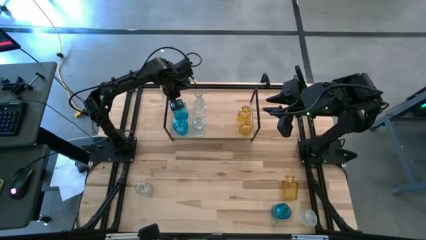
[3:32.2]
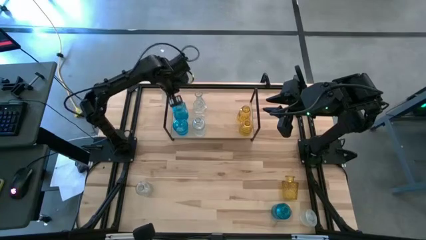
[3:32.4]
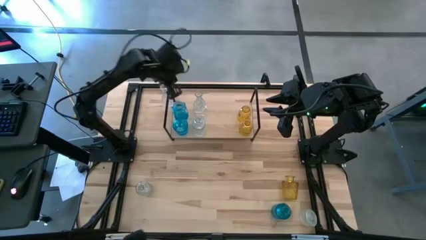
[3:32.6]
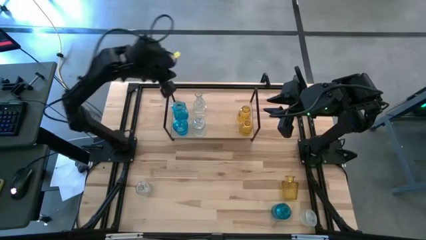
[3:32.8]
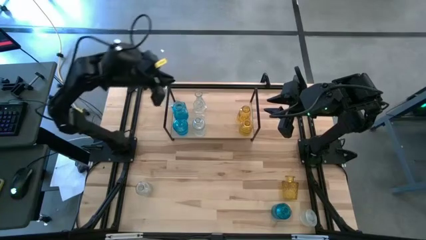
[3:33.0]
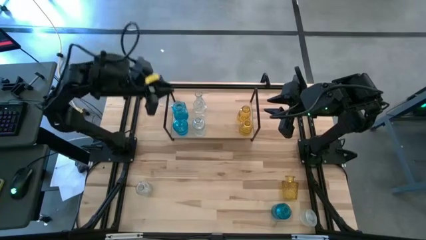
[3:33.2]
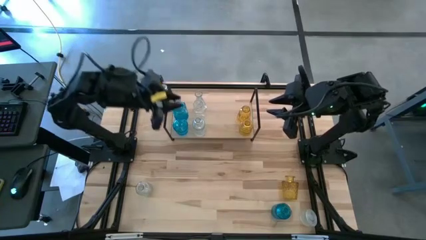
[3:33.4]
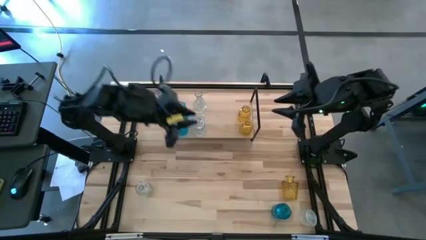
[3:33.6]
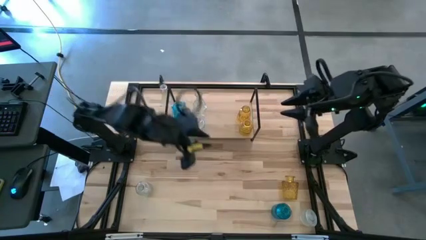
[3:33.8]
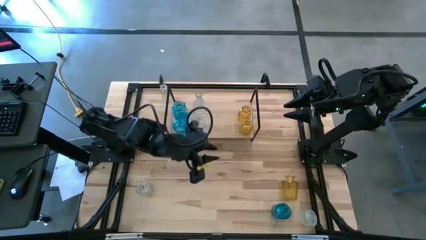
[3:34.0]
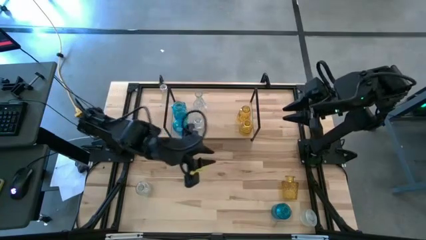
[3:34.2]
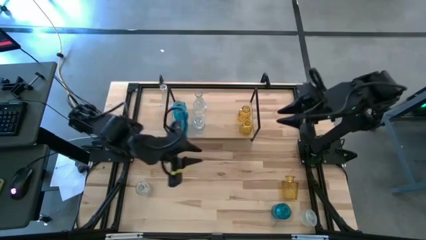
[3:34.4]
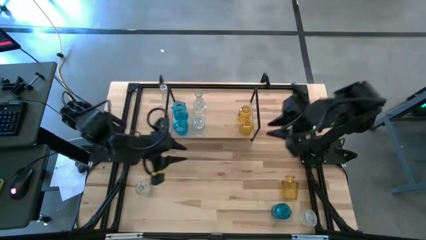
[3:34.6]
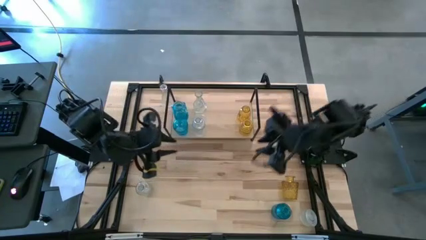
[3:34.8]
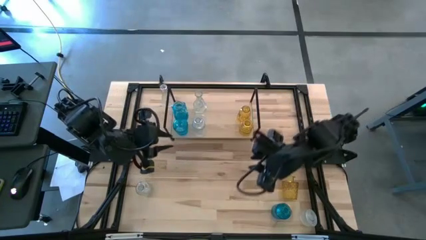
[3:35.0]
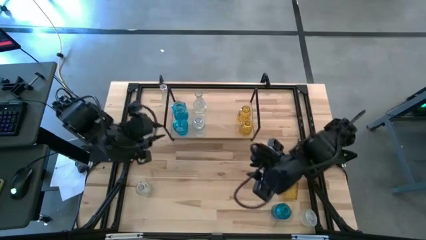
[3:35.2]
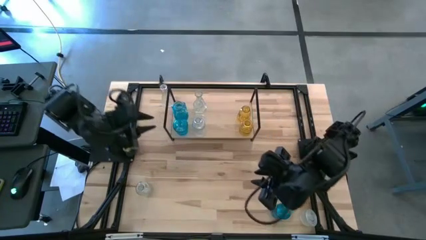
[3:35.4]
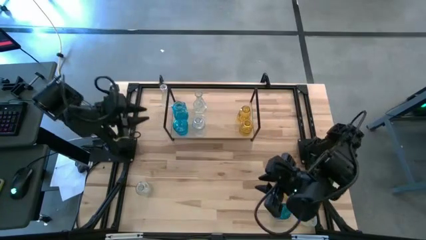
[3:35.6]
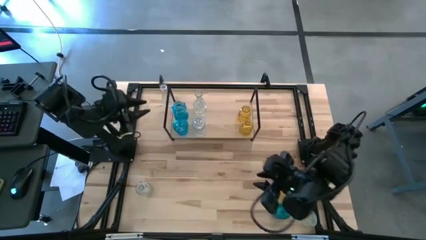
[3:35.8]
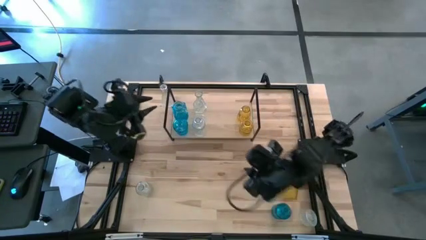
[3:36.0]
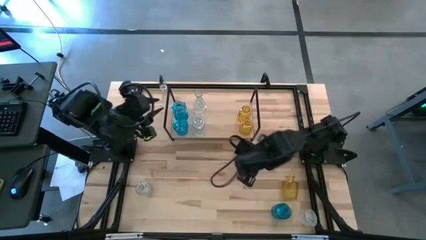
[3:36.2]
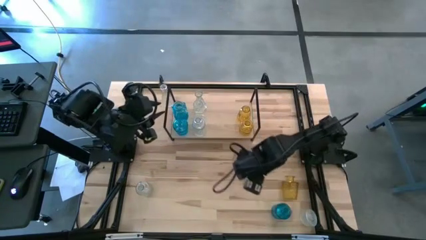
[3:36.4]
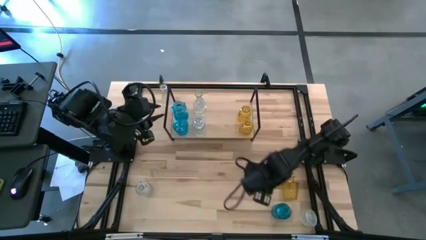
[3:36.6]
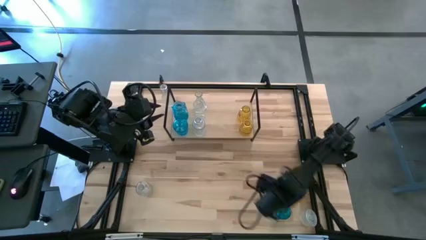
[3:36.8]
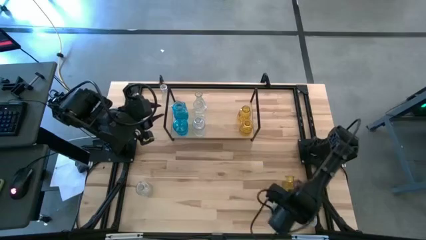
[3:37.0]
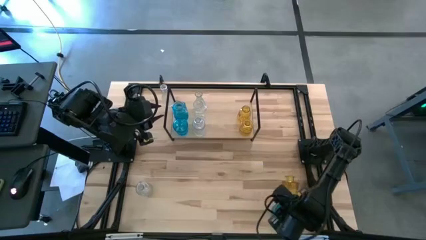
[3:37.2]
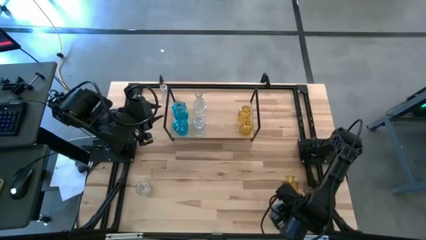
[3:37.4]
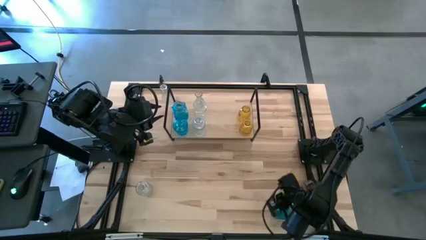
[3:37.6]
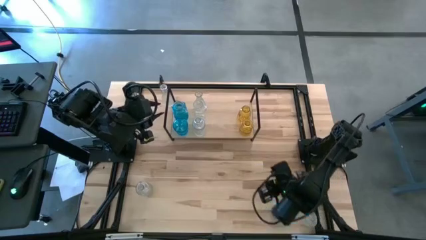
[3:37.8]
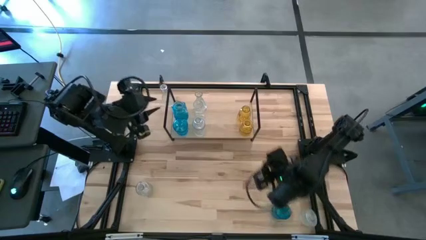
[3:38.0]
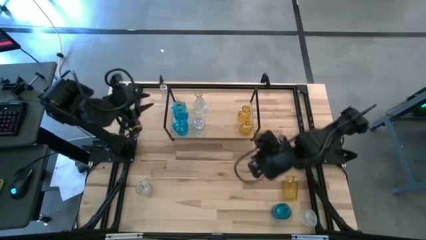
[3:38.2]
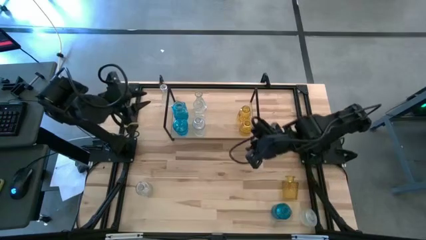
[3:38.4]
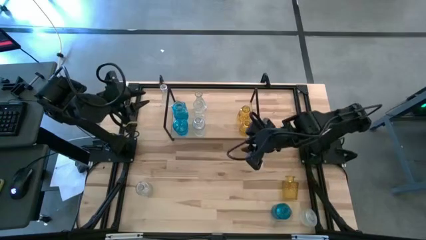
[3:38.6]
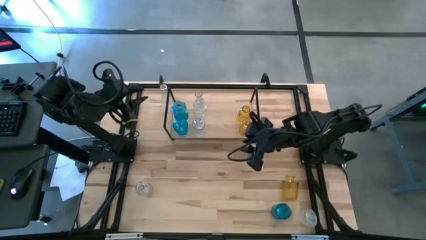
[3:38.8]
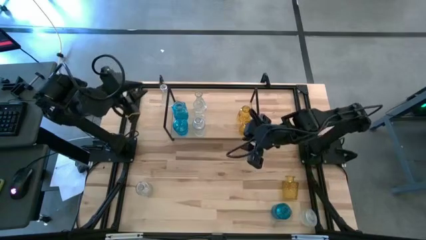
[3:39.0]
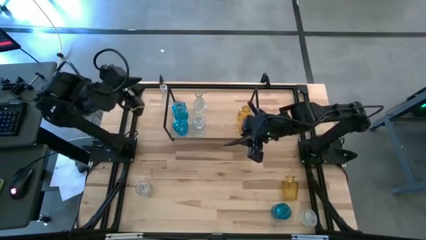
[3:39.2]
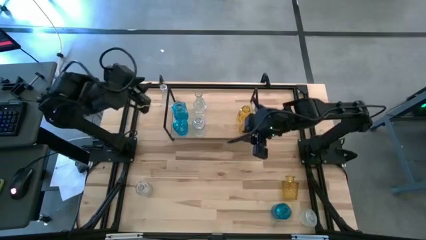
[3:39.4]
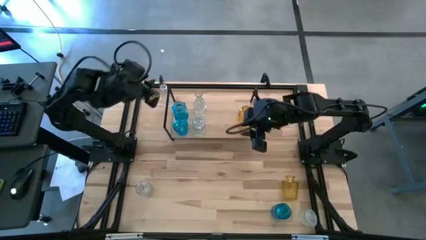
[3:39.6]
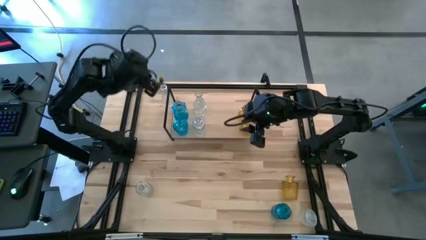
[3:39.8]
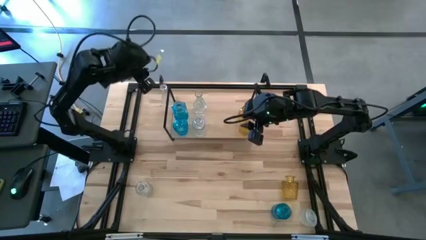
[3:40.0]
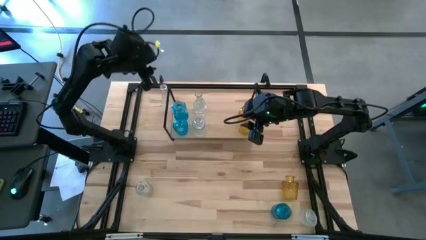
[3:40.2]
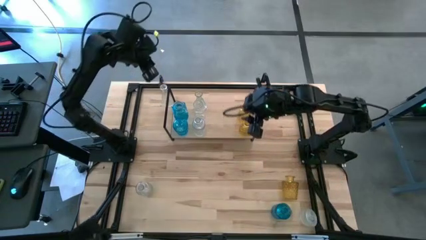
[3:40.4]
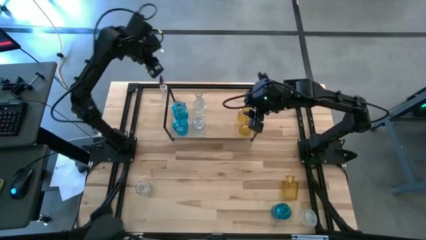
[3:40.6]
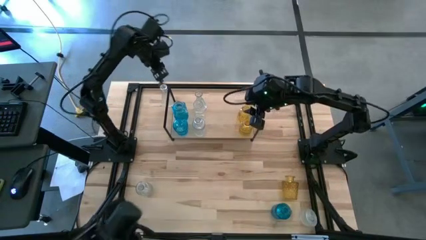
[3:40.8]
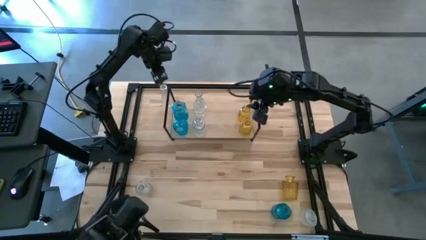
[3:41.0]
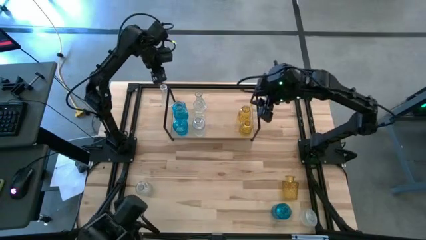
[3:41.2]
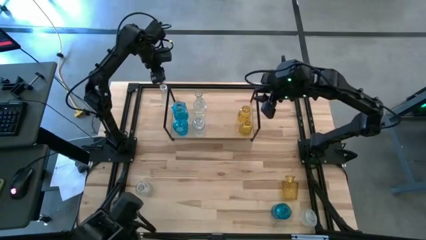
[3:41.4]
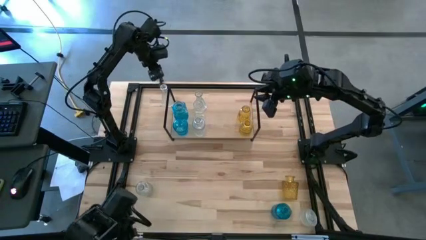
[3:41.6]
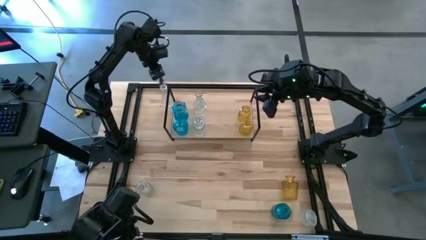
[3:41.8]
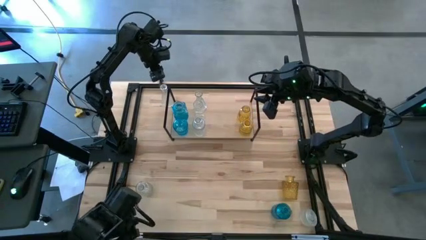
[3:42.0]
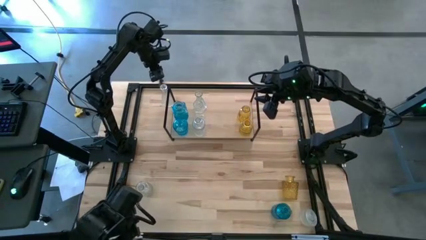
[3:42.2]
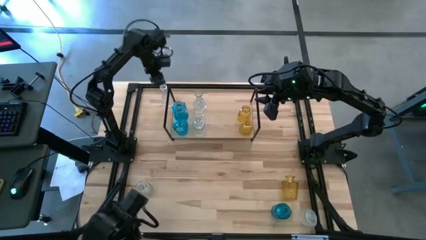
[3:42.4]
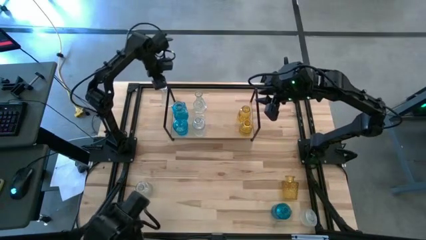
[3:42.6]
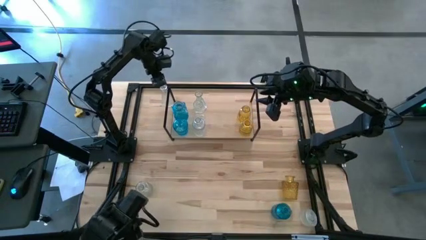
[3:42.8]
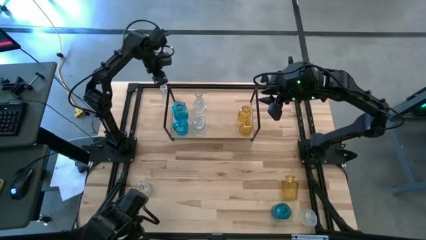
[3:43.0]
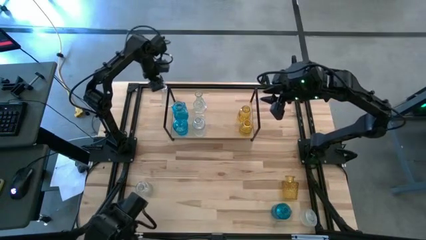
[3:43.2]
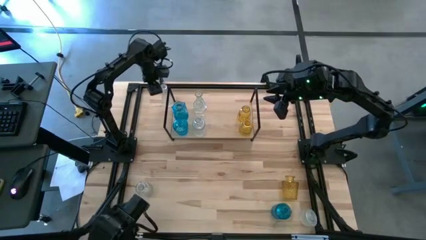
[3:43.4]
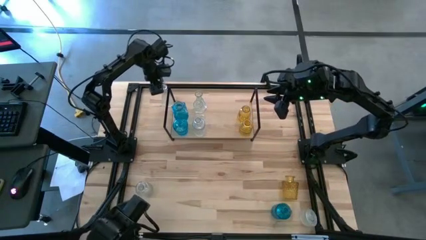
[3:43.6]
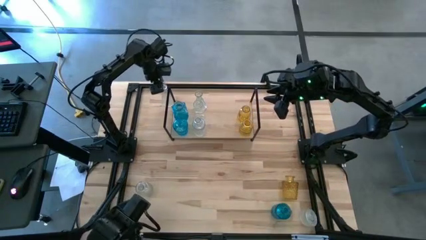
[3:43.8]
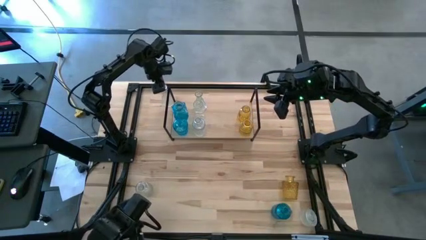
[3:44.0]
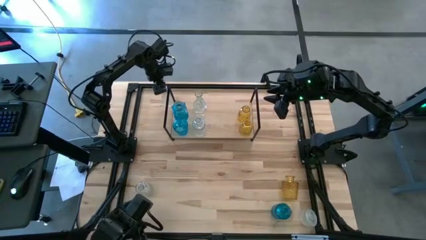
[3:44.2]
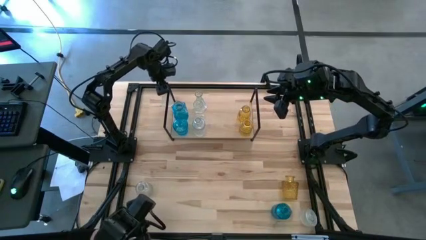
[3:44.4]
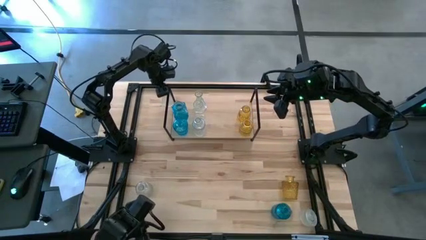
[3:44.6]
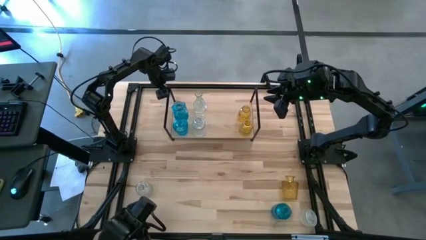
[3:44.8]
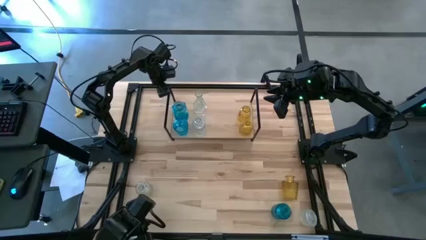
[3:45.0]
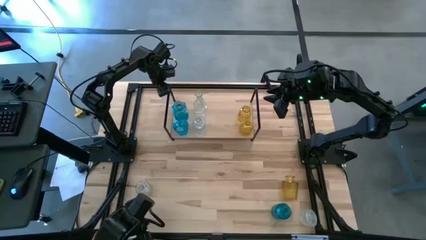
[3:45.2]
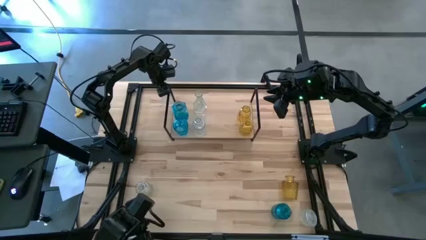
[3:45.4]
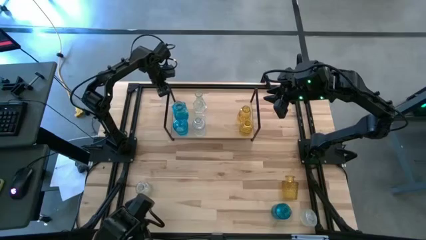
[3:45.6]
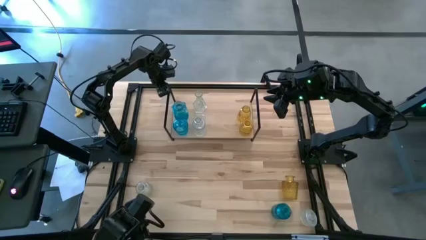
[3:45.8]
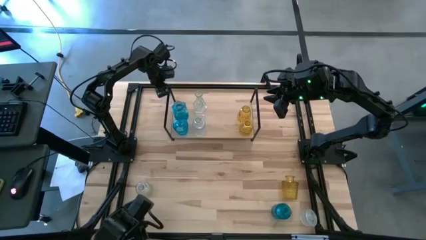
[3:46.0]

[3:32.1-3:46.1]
Task: sort vases onto shelf
Put the transparent vase on the shelf
